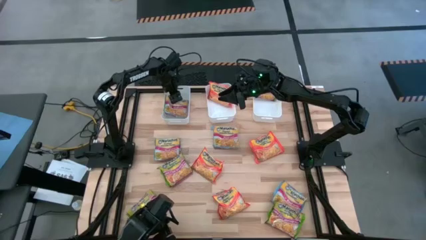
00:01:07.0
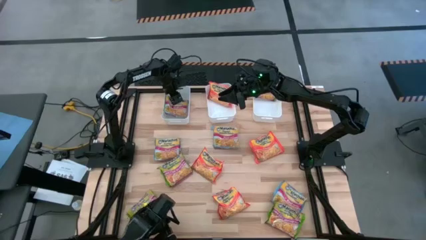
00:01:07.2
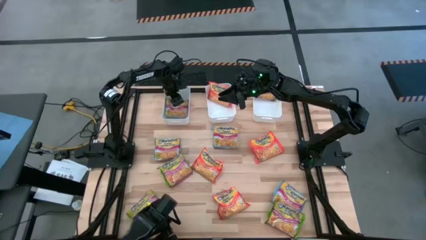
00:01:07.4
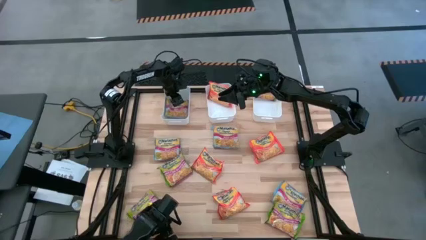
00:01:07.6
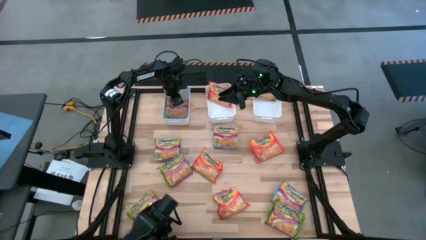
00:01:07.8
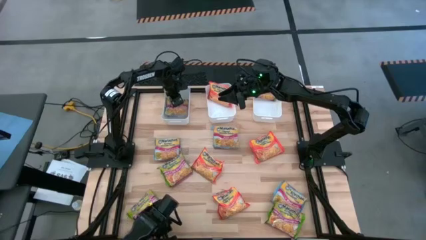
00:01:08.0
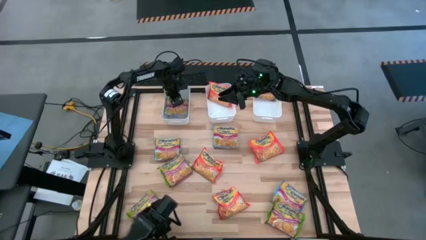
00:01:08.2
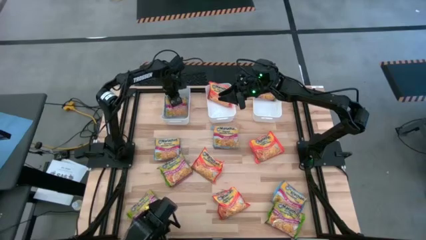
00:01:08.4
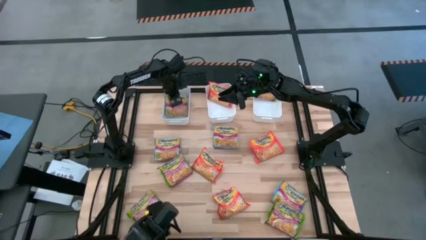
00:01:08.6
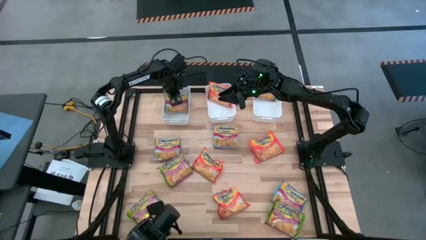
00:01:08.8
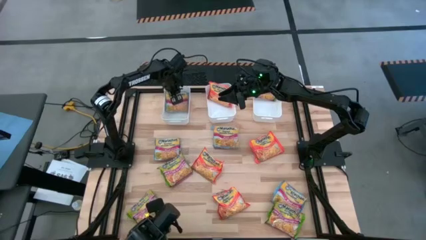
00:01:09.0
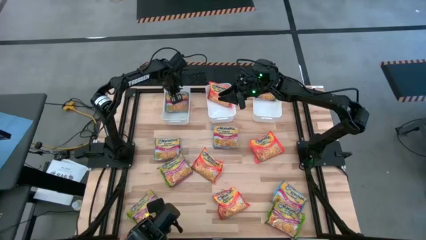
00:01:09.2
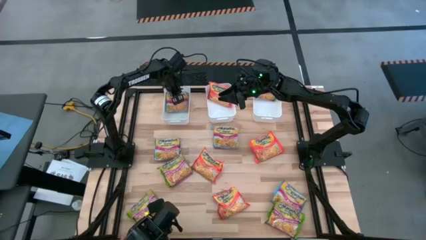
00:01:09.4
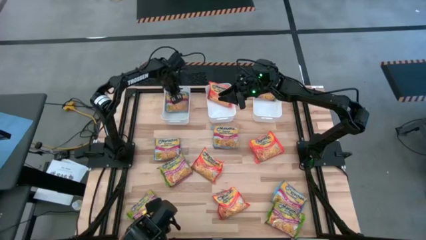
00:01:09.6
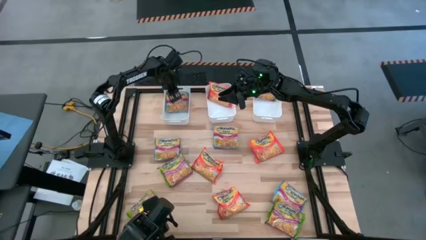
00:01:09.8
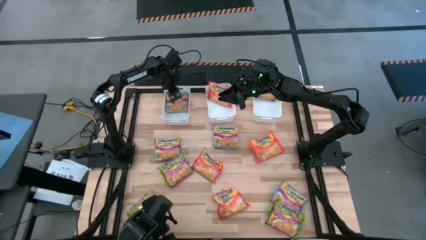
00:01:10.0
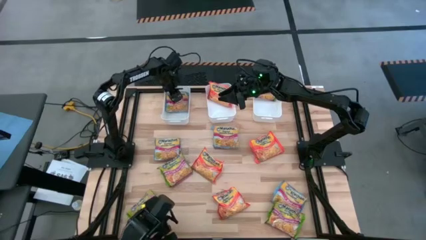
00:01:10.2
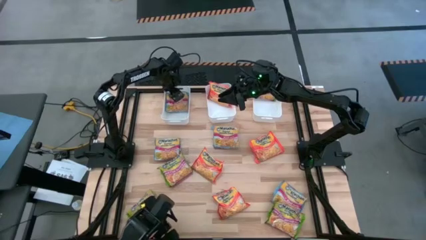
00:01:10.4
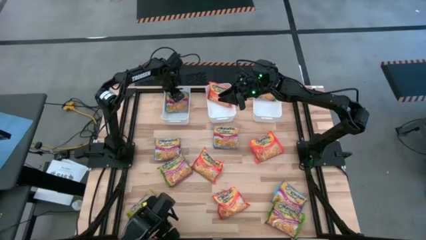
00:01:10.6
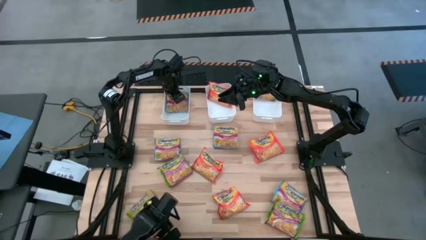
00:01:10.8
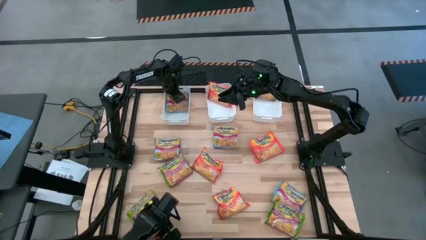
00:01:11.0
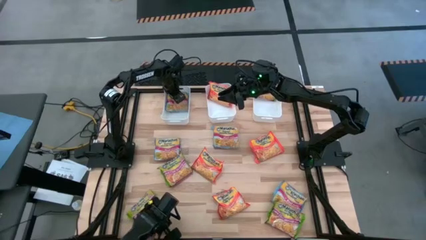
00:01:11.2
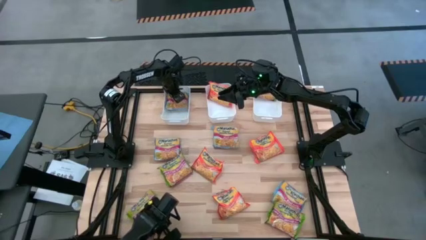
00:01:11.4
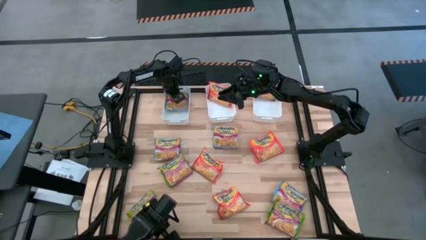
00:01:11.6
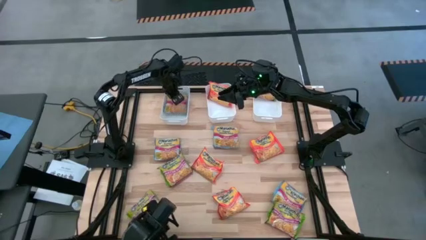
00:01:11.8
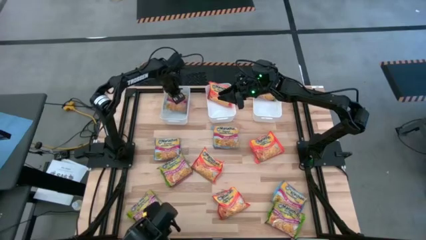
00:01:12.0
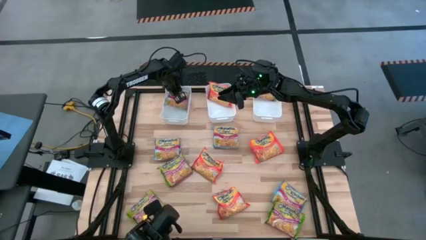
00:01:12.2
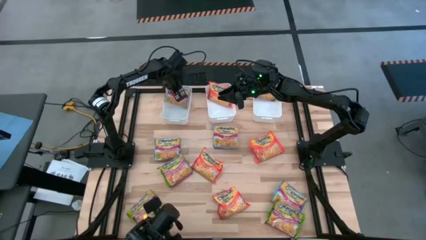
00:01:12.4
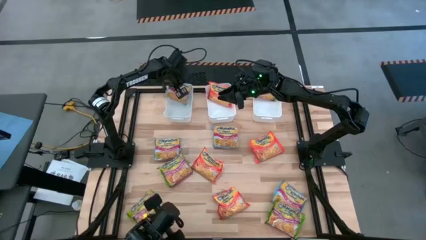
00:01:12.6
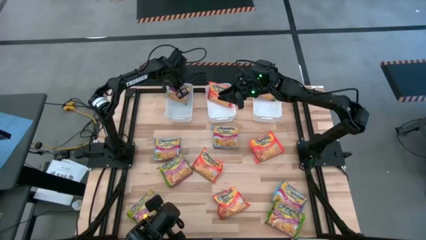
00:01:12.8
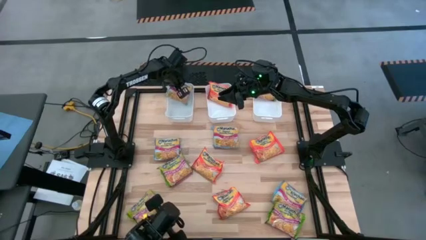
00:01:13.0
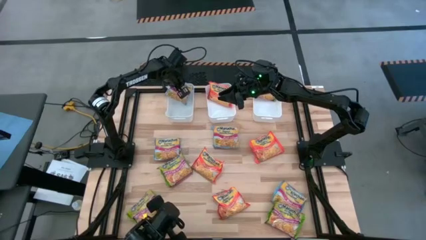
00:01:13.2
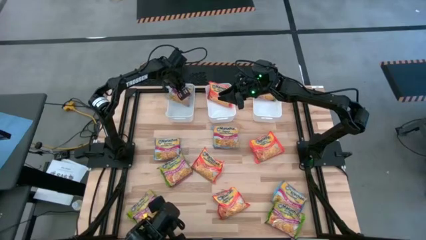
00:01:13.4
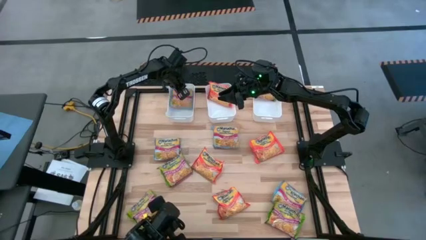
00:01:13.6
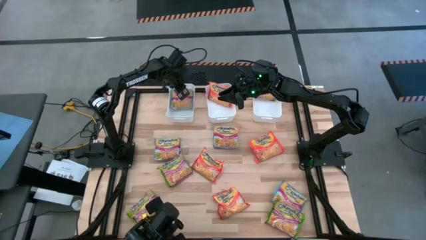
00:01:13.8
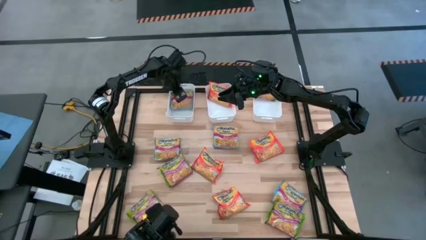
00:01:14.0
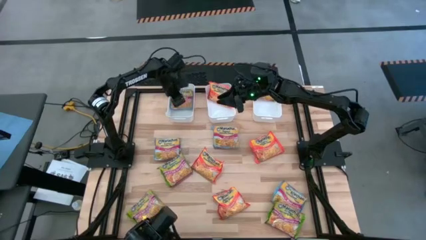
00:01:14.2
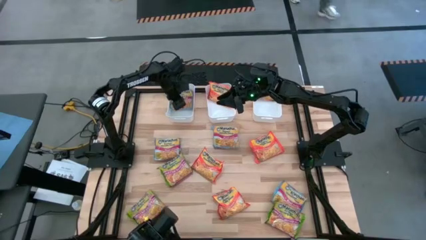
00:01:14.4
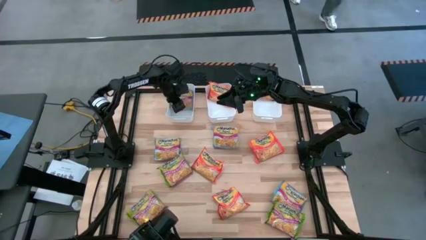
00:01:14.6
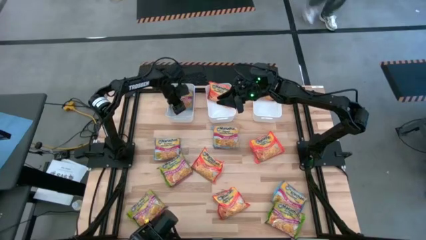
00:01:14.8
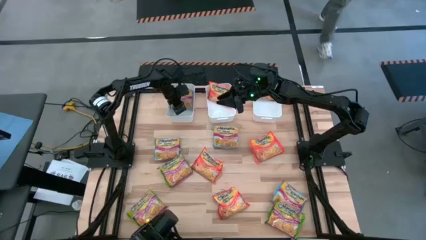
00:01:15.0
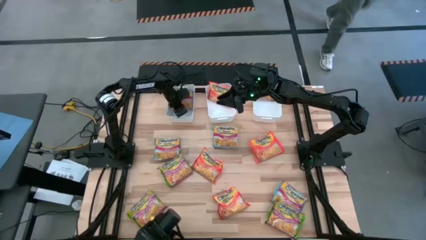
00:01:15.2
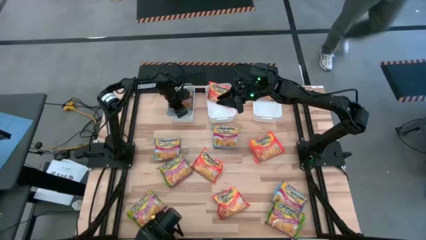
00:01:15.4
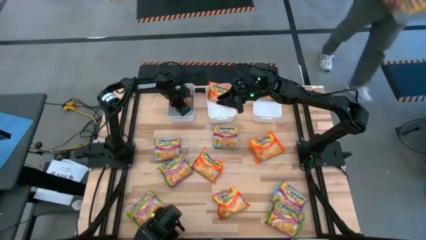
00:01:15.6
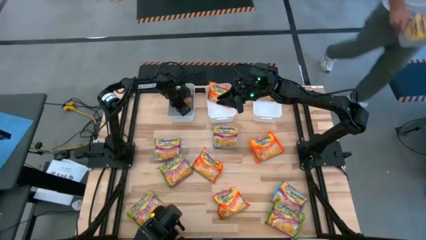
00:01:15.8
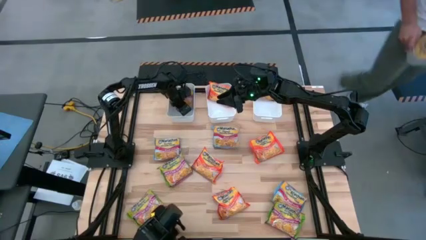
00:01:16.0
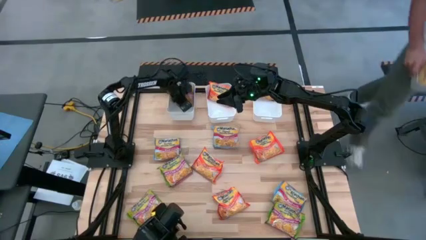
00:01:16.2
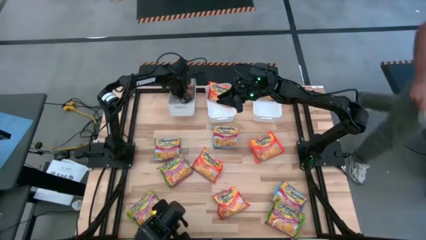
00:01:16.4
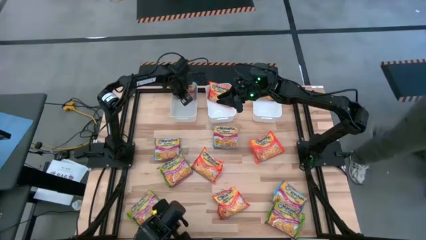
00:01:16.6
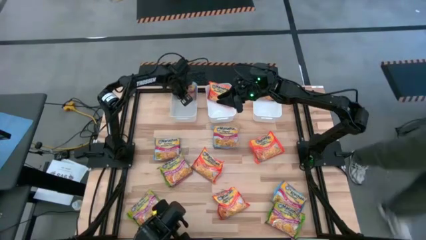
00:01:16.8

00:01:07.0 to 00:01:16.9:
Task: Sort Maruchan noodles
Adjust the blue noodle pack in the left white bin

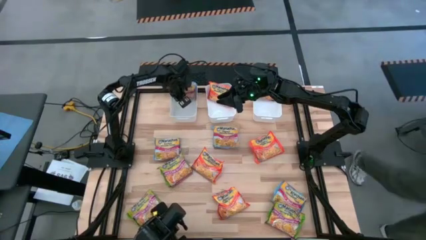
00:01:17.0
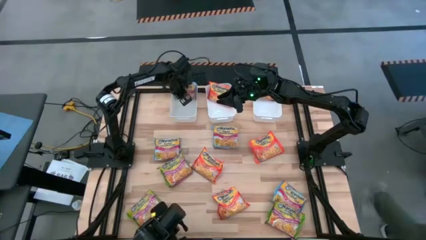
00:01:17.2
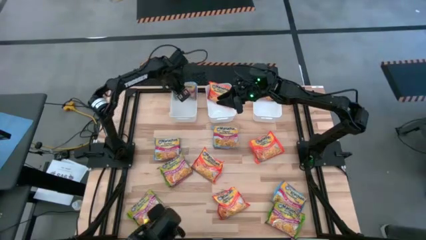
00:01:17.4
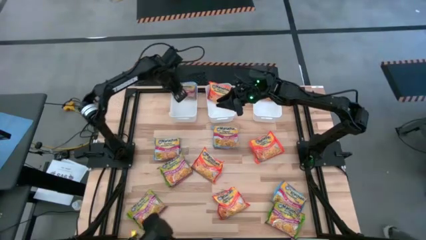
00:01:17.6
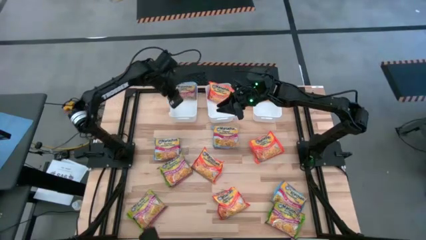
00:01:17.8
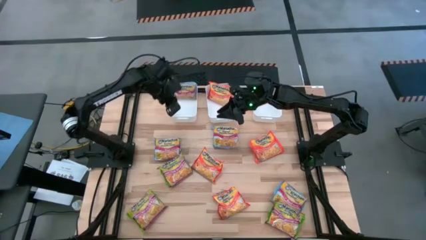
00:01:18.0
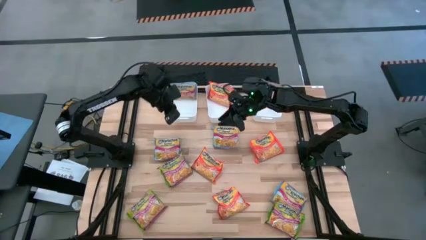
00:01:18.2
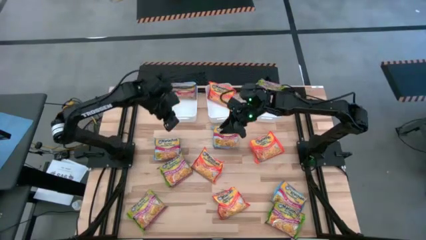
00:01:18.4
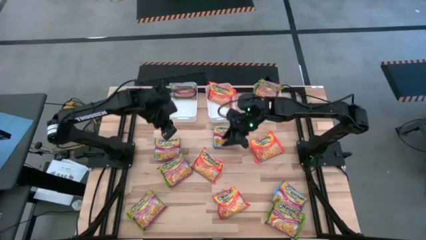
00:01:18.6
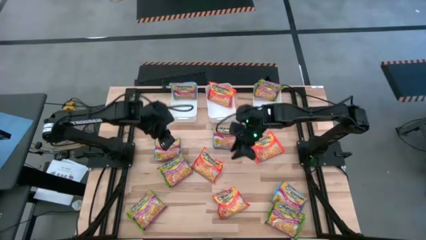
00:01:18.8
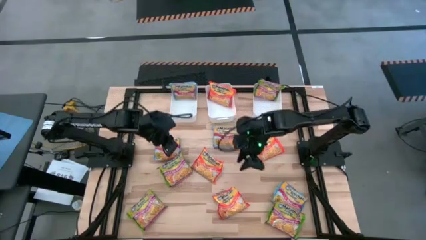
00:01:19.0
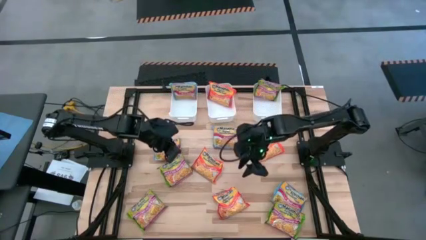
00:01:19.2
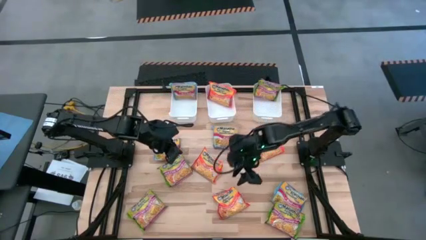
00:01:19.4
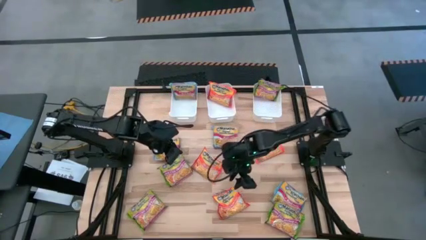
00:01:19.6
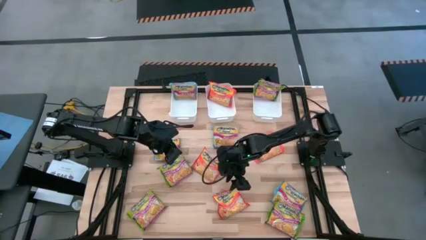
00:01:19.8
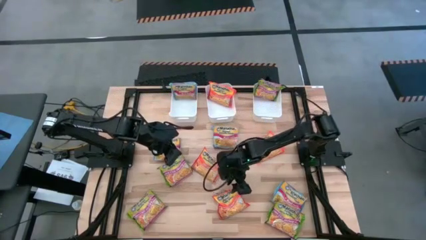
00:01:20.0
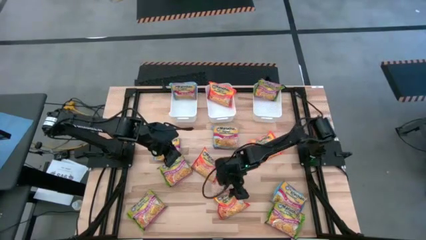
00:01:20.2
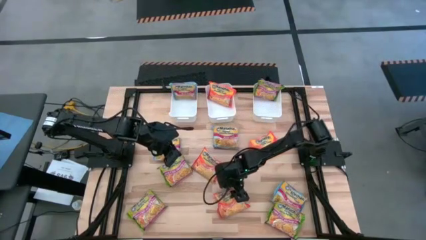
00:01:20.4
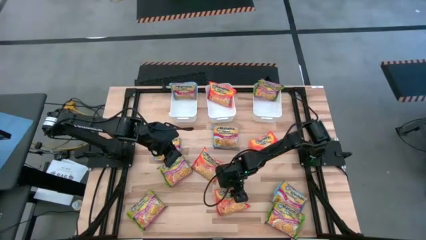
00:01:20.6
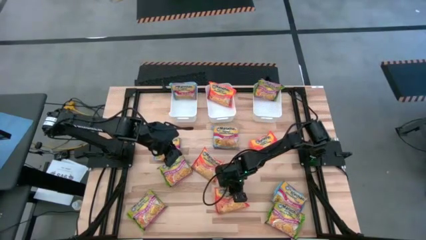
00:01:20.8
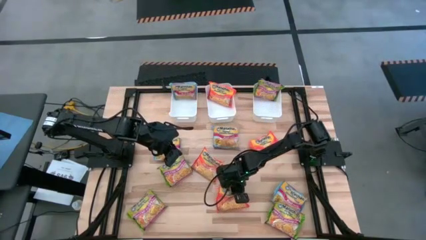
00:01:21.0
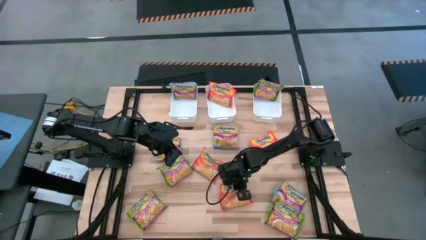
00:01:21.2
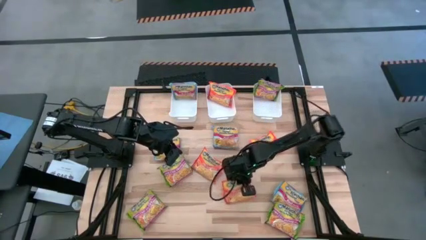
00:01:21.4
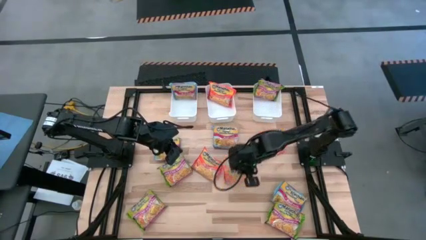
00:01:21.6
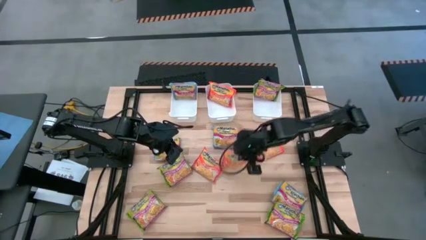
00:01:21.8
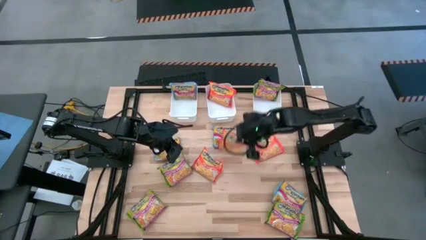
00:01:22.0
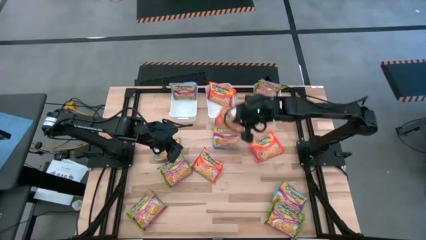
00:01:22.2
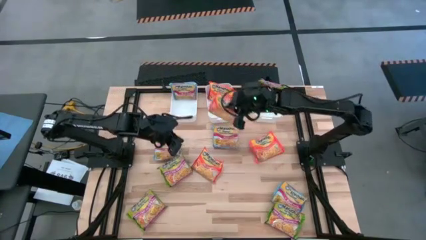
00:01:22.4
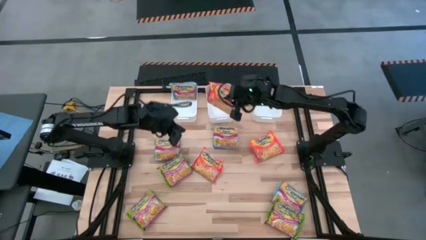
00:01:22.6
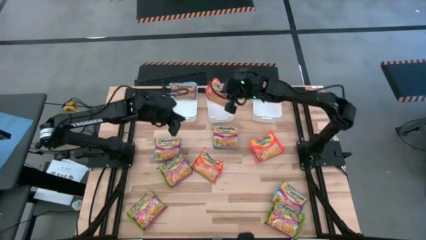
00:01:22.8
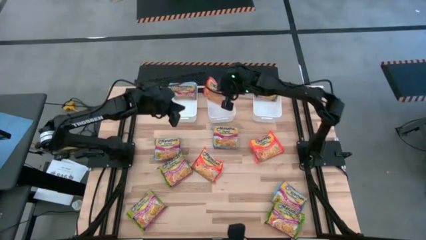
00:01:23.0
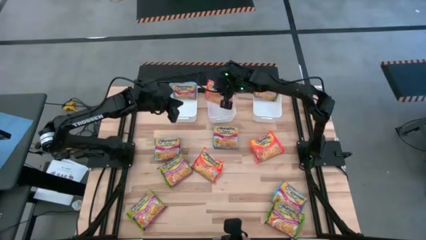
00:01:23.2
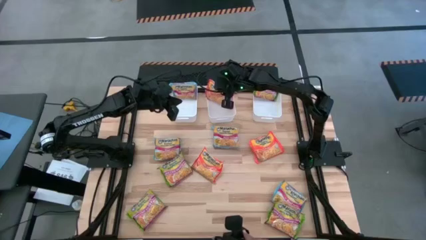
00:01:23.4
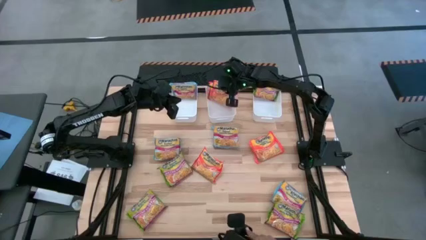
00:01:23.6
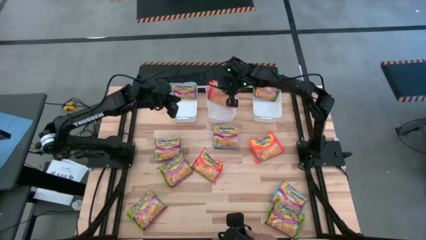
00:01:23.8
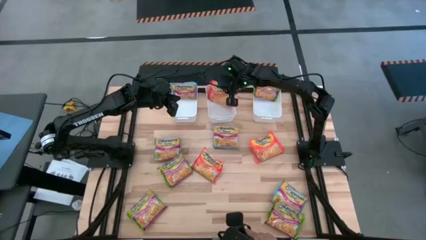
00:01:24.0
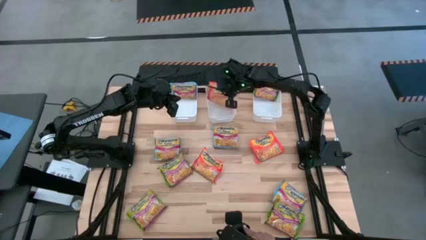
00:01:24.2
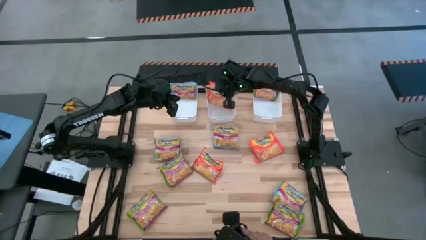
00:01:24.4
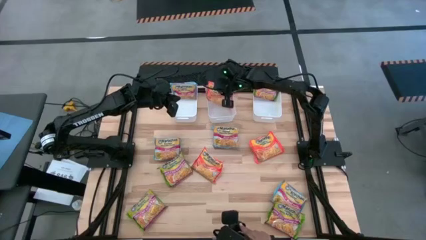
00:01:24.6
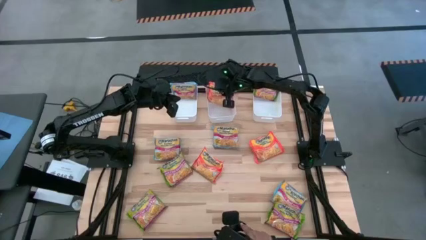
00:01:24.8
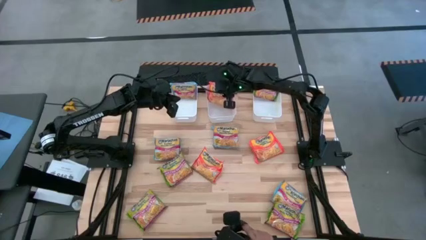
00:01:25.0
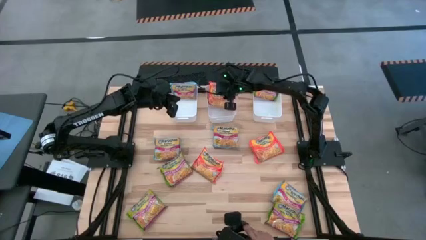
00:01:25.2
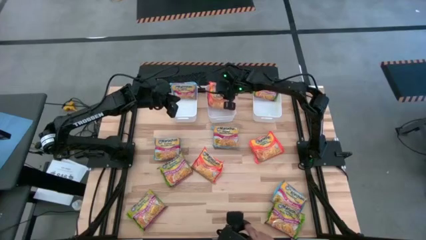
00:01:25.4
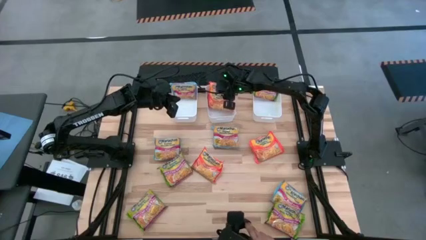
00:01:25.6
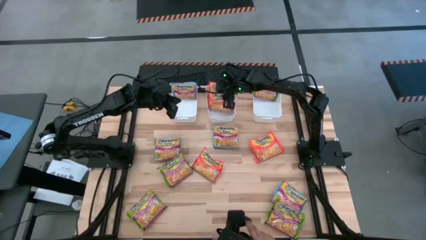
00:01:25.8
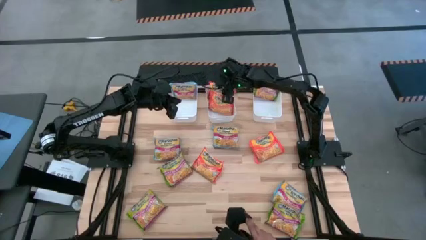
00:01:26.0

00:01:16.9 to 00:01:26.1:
Put the orange noodle pack into the middle white bin
